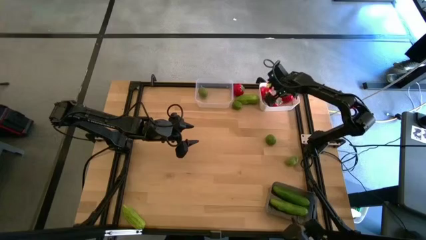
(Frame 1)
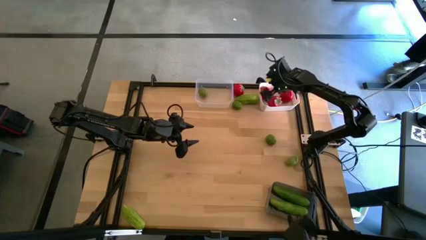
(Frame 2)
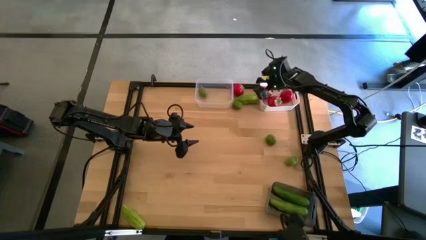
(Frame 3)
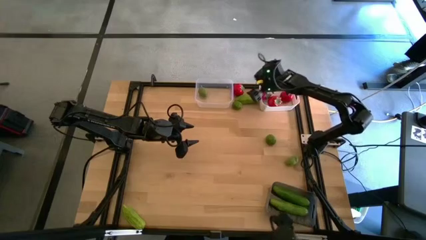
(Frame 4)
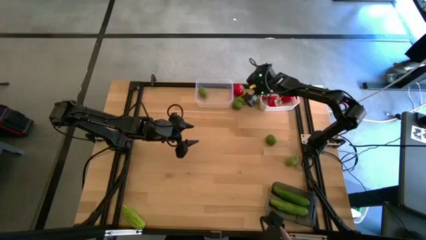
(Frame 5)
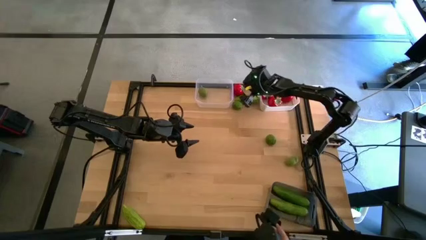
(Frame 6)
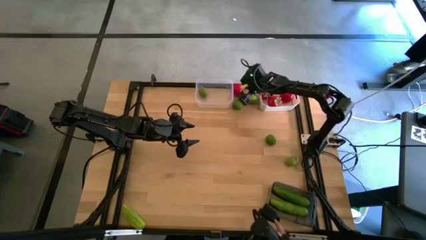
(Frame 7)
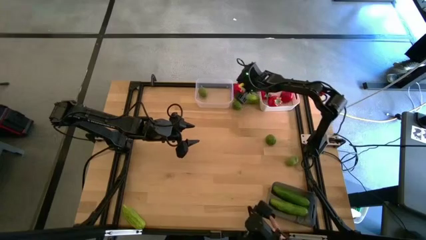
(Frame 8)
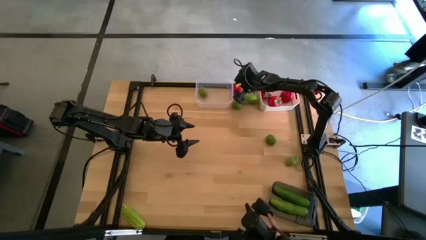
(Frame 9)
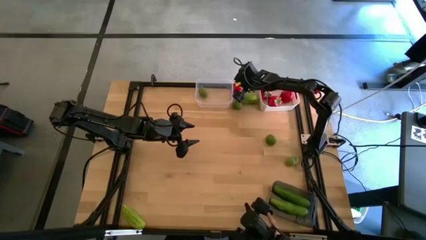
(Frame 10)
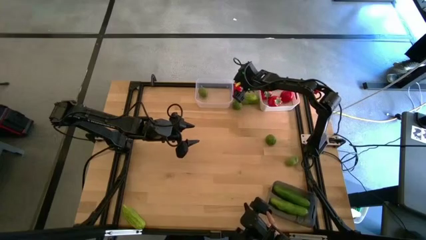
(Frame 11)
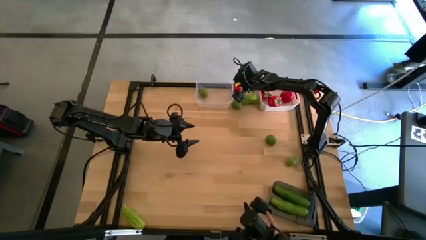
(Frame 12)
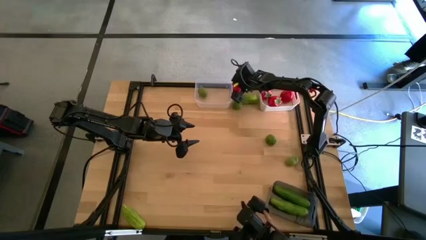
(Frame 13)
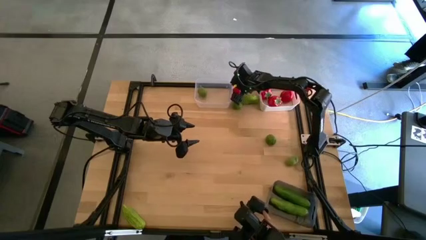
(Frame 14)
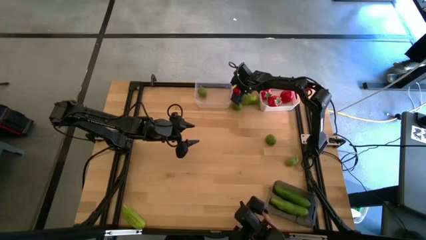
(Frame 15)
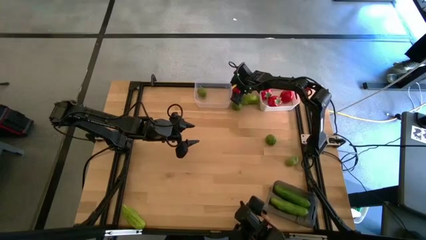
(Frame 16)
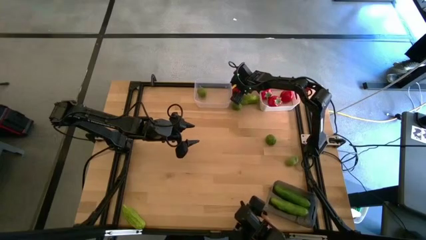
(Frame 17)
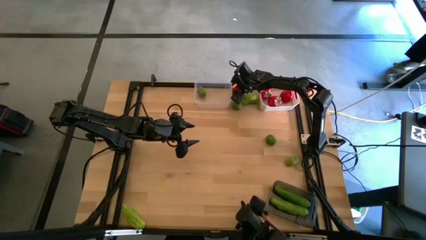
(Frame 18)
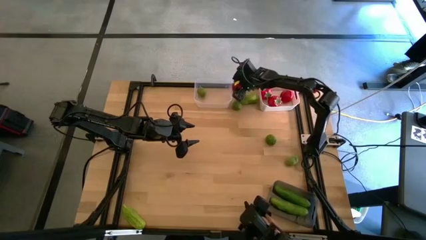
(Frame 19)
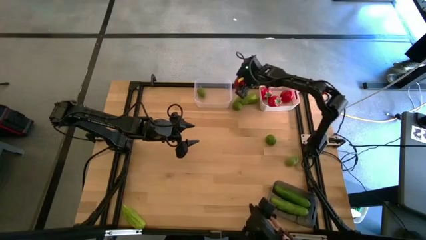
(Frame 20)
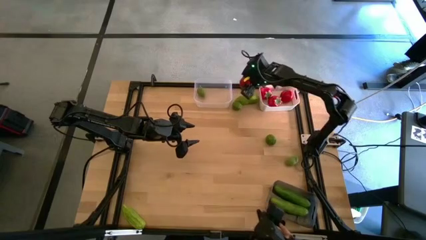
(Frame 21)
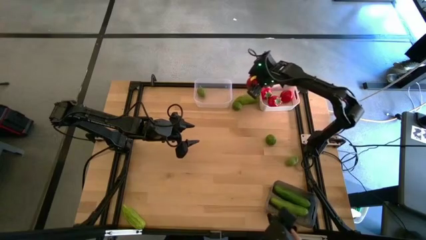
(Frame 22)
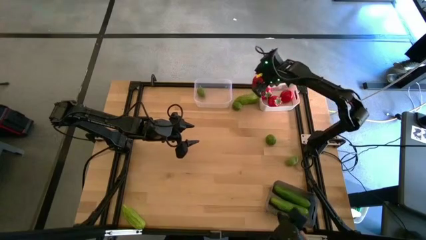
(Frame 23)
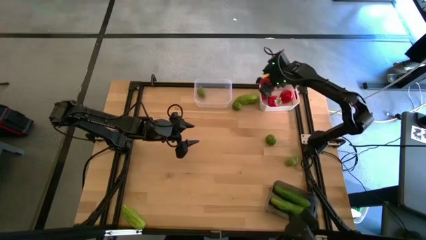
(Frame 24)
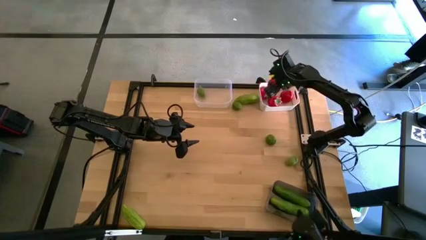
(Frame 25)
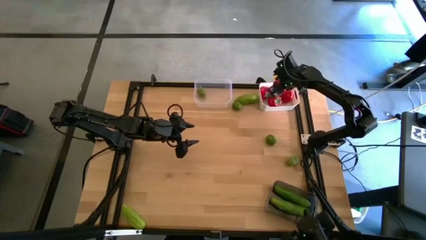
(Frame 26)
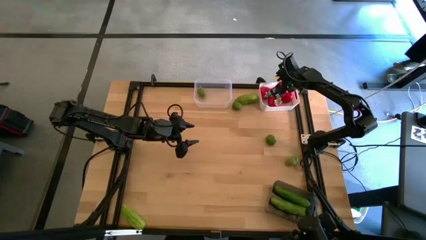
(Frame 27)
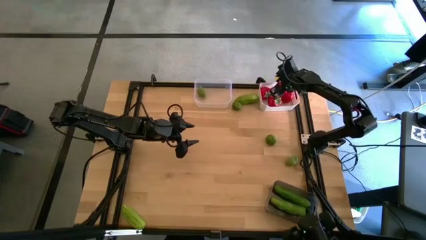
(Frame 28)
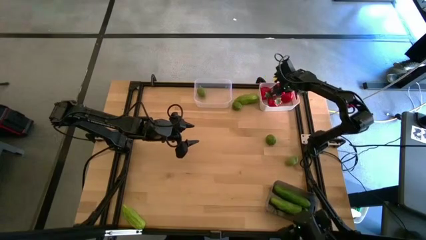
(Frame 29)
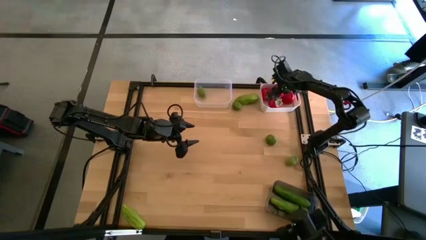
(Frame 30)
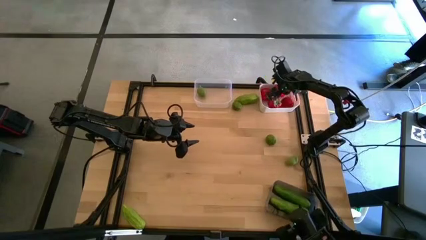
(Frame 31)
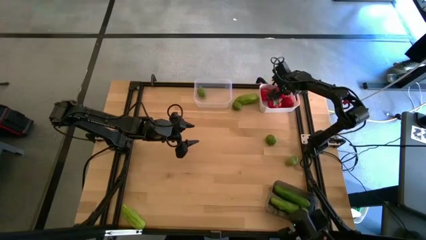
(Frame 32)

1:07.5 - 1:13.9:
Task: Sort produce into baskets
Put the red tomato into the white bin

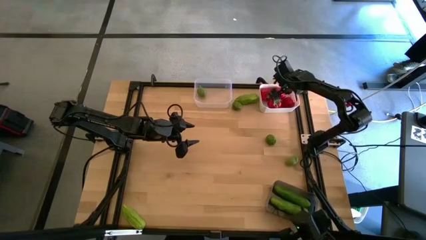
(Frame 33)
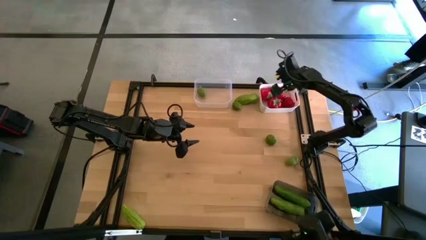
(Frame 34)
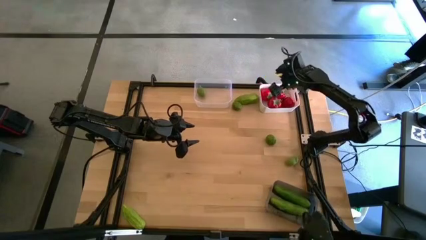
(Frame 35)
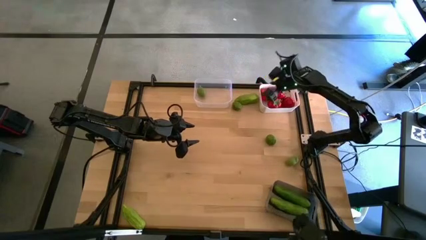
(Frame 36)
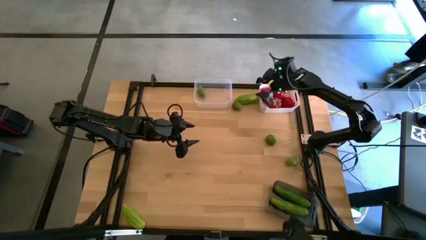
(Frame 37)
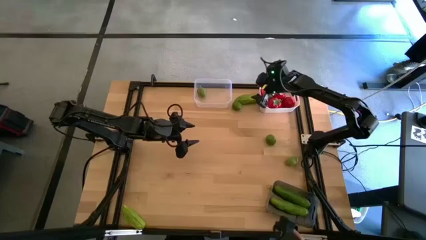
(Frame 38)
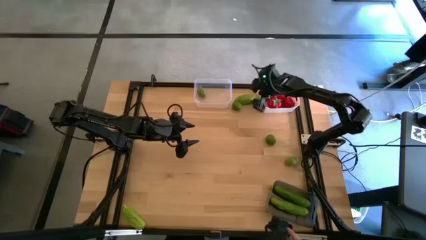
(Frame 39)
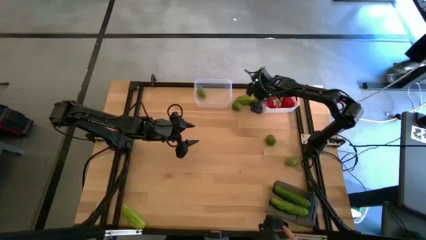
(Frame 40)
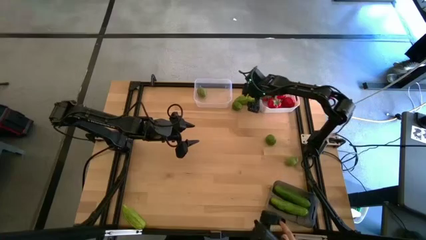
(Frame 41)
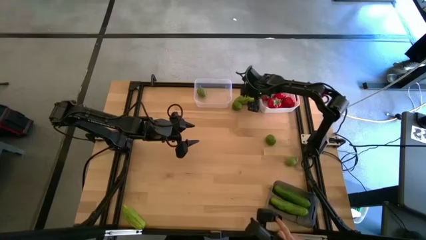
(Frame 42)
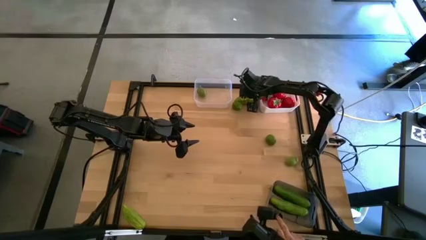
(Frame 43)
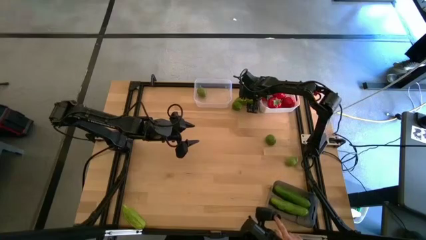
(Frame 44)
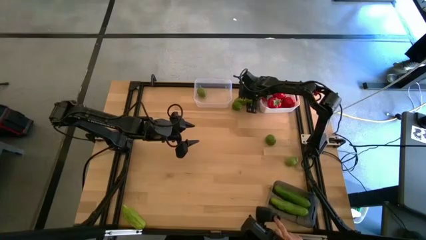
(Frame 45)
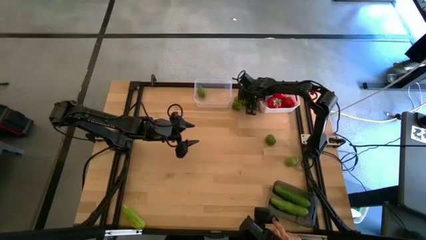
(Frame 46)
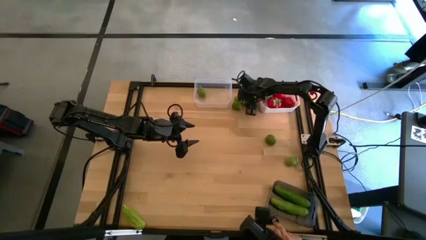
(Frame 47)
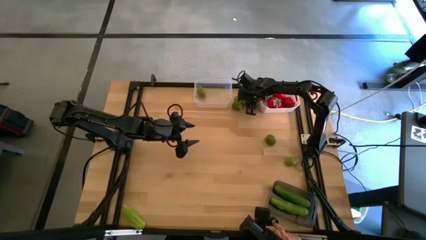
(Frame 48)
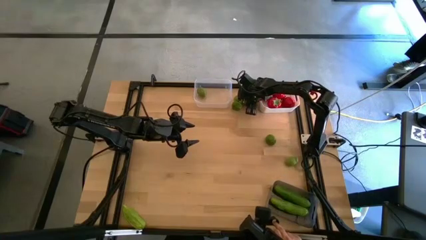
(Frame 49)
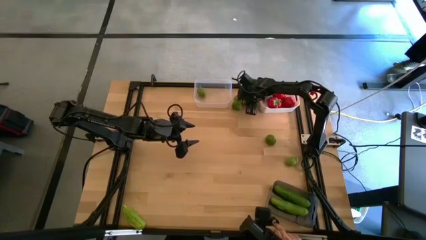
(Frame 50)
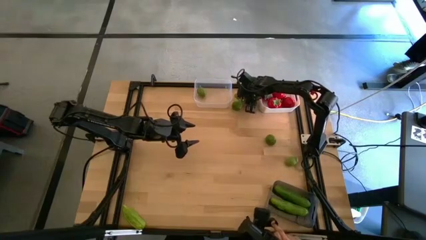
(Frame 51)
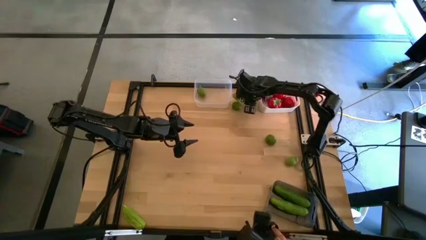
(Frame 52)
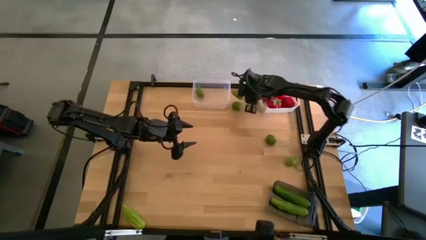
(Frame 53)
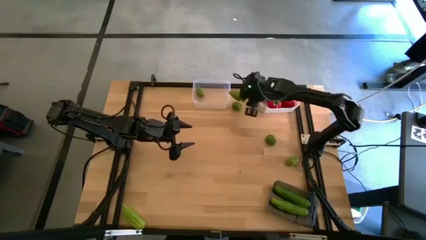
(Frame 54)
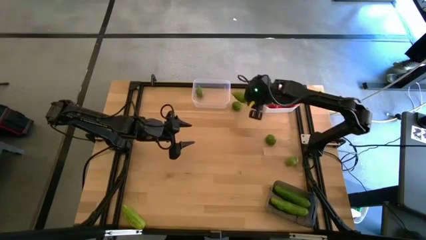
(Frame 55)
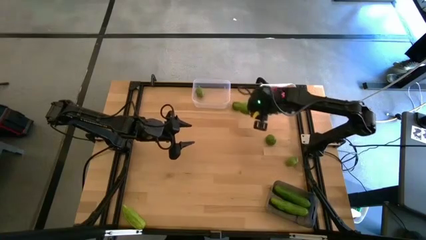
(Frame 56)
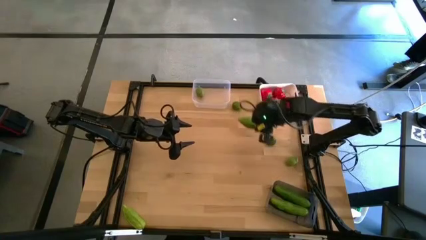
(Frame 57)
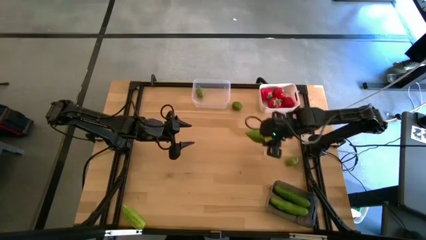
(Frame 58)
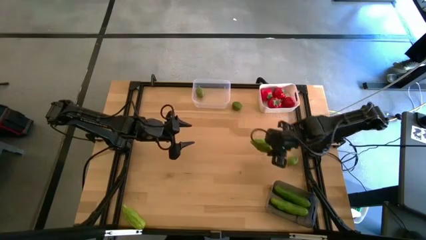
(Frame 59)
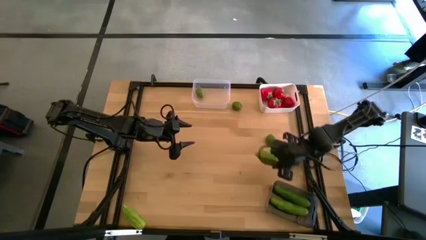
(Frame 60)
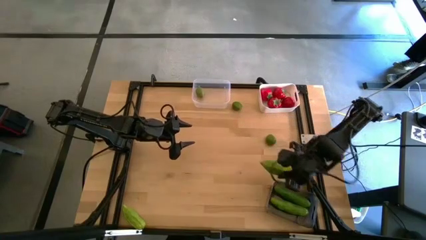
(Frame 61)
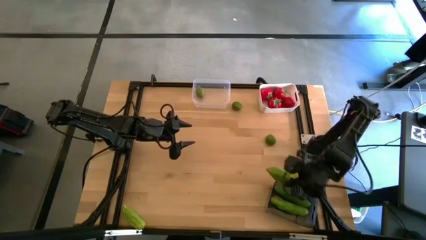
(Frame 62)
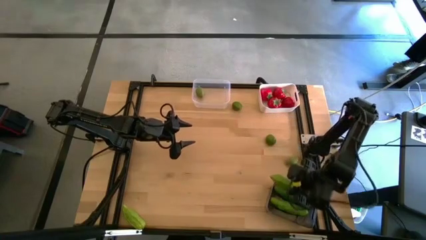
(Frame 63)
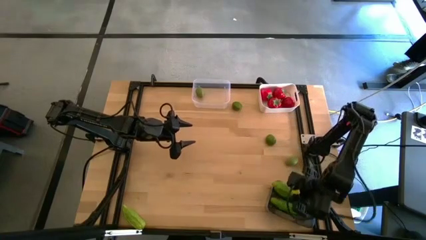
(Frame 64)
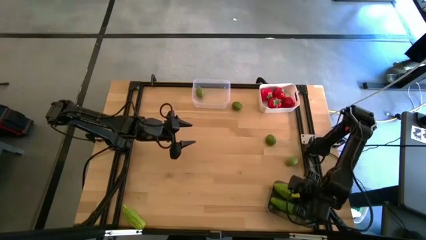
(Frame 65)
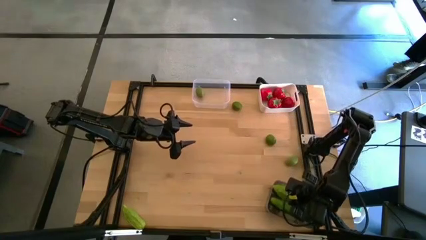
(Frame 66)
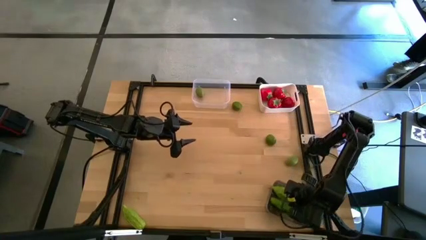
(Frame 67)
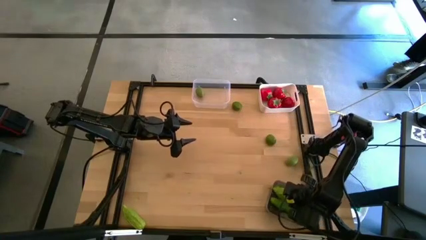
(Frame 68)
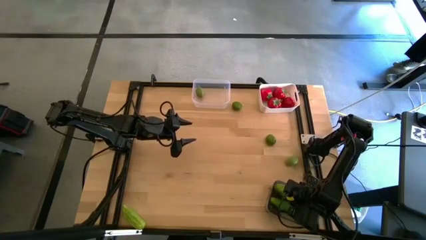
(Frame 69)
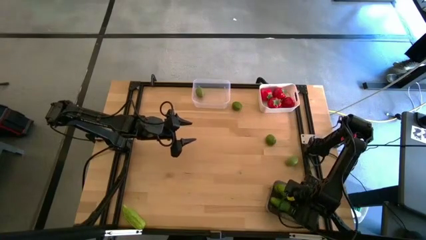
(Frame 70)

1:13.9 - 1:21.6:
Put the green cucumber into the black bin

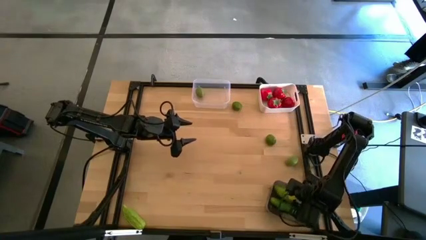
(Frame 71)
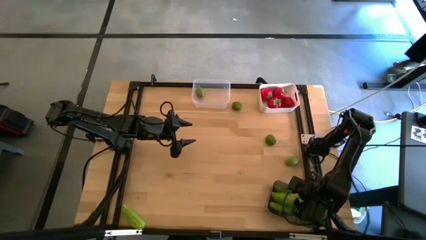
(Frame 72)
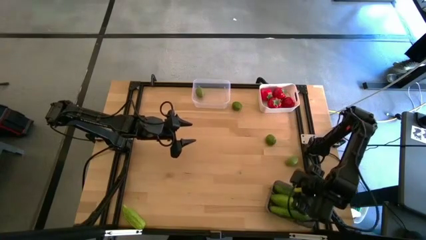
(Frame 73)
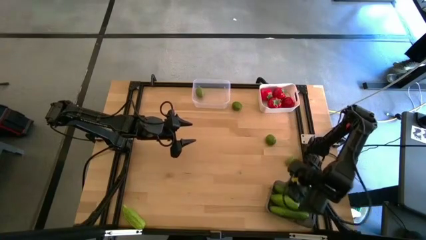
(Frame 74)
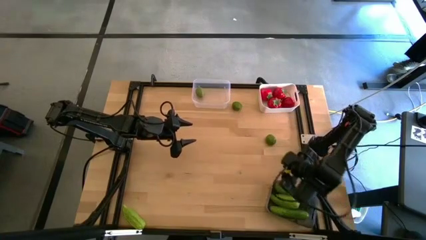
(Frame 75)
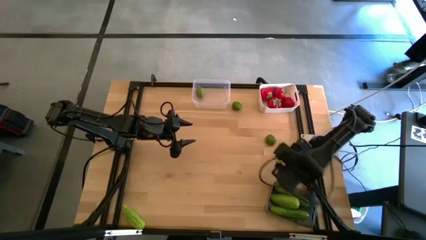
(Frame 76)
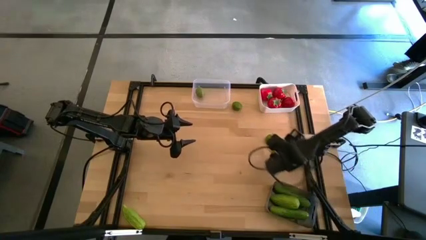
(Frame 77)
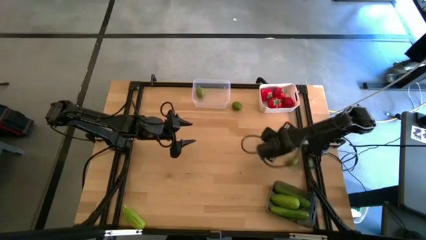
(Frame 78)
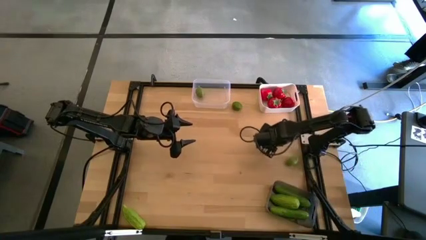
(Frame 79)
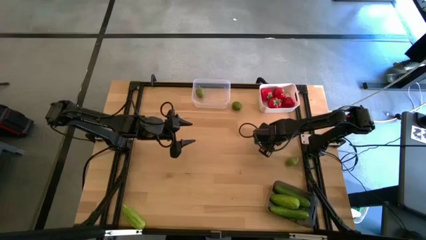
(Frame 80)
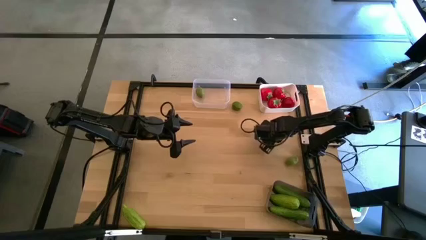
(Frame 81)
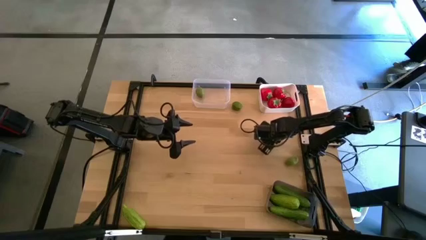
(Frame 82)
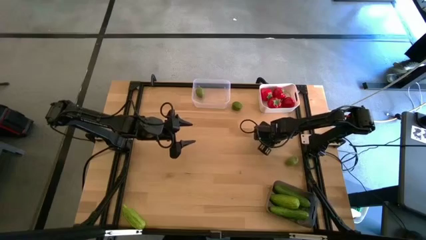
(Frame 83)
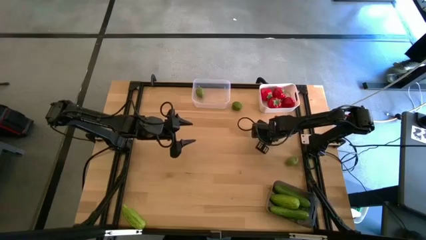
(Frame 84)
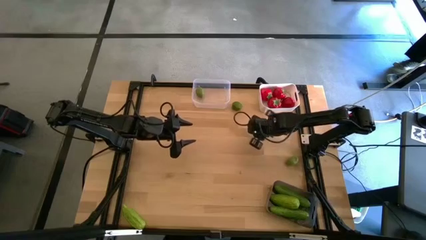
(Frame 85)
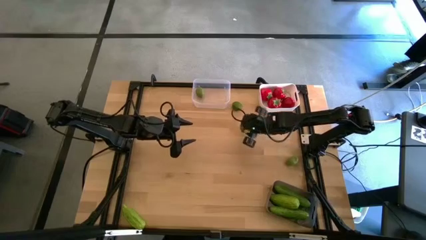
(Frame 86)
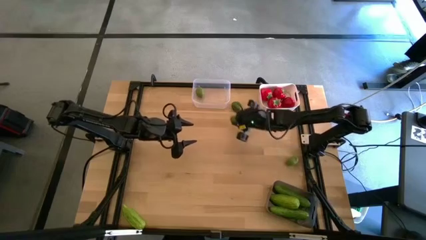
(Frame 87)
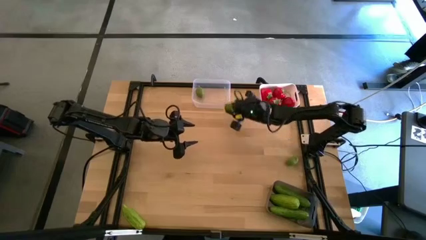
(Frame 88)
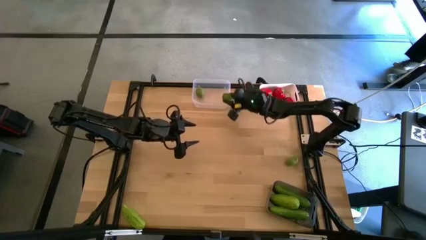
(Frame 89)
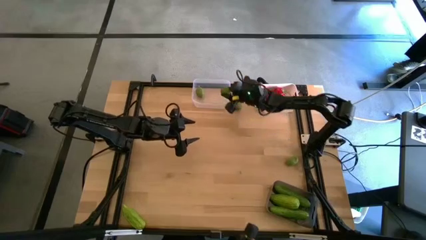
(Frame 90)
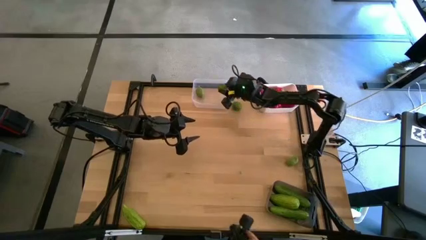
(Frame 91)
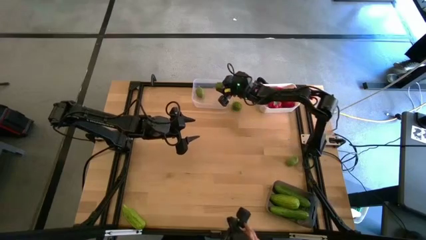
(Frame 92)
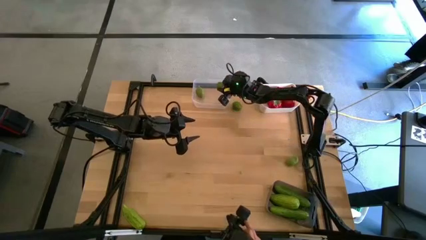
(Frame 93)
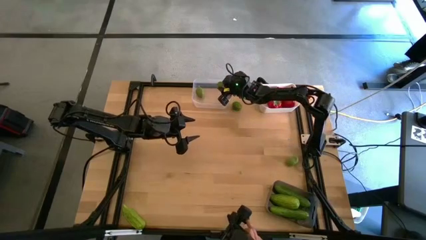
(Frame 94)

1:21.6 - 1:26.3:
Put the green lime into the transparent bin
